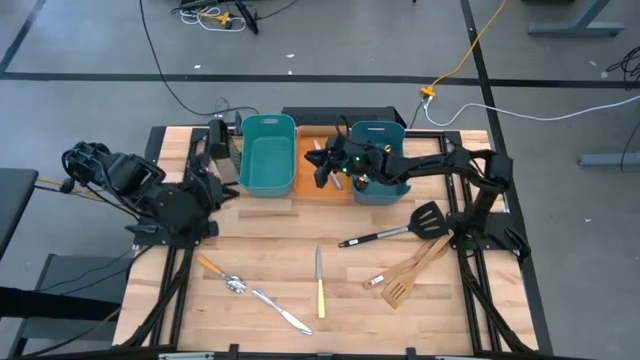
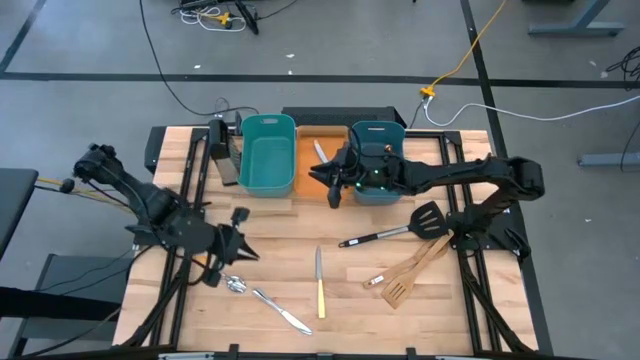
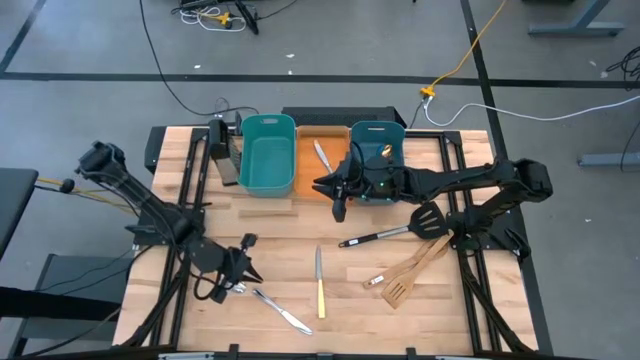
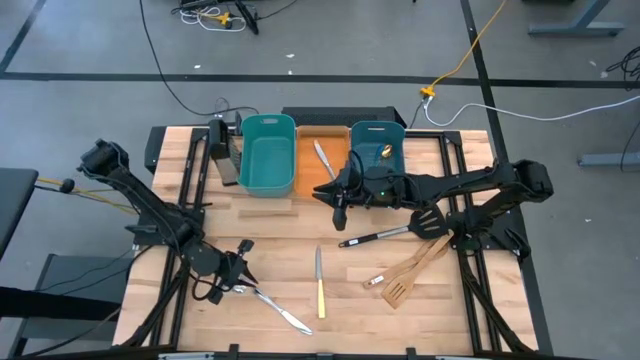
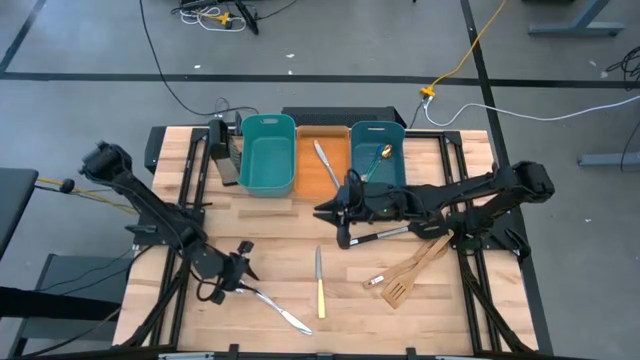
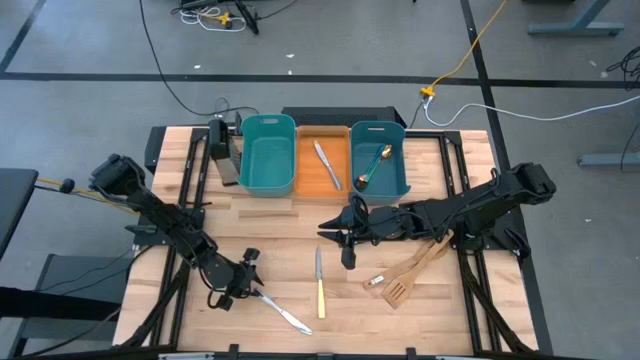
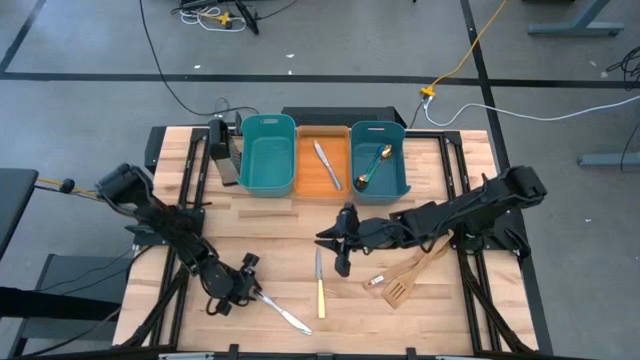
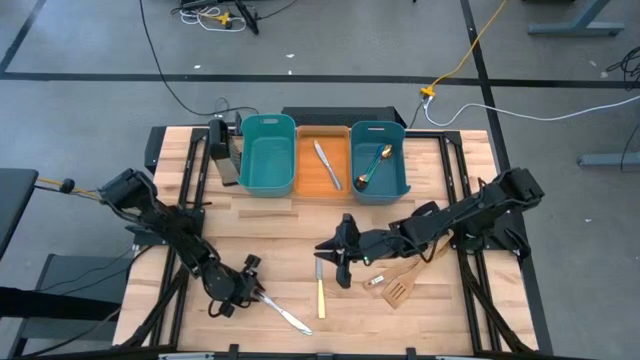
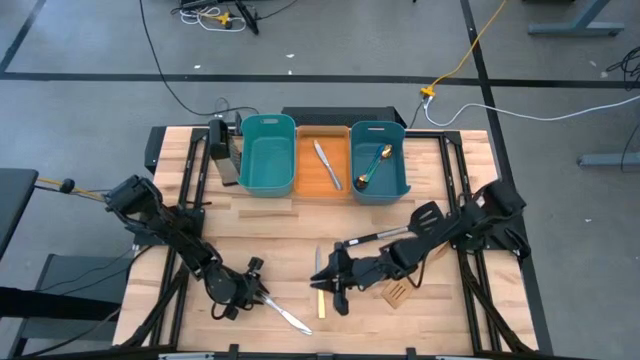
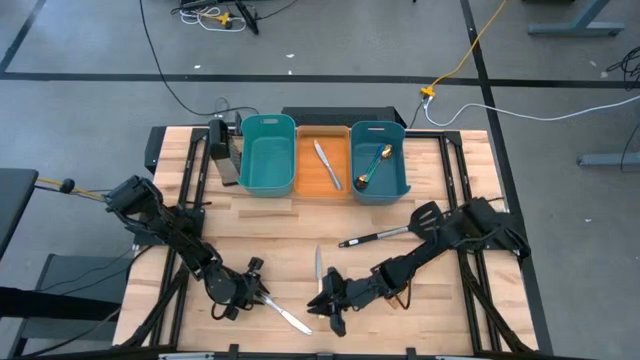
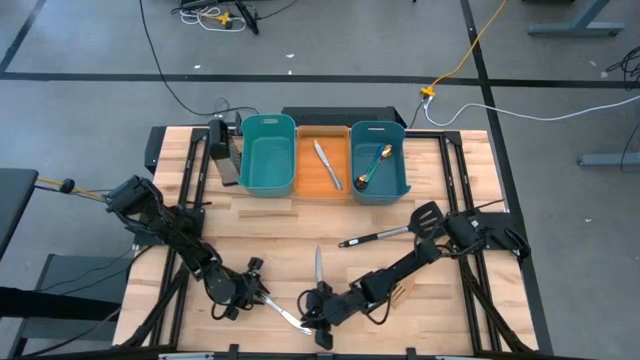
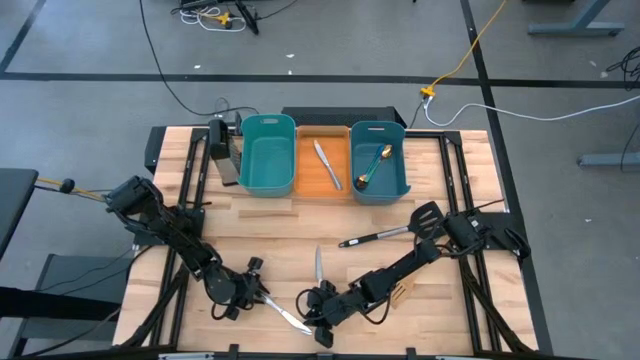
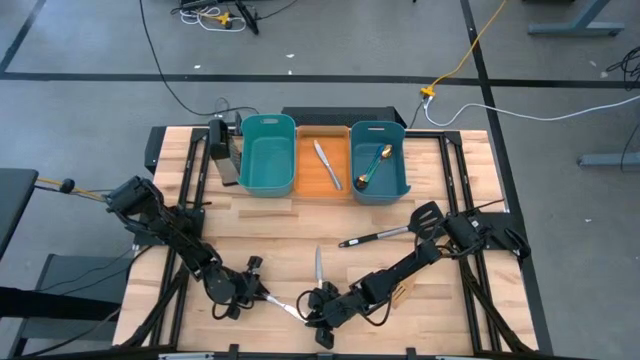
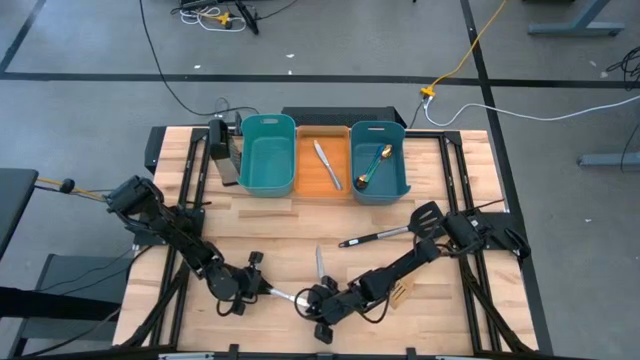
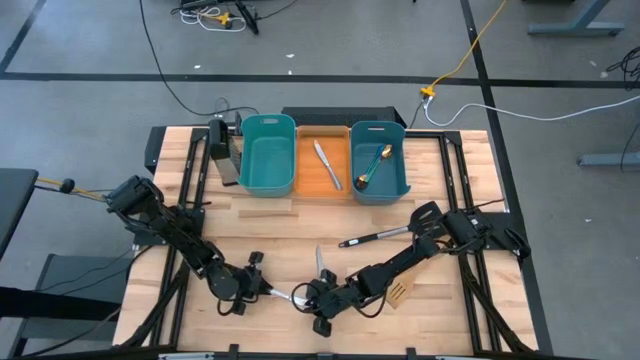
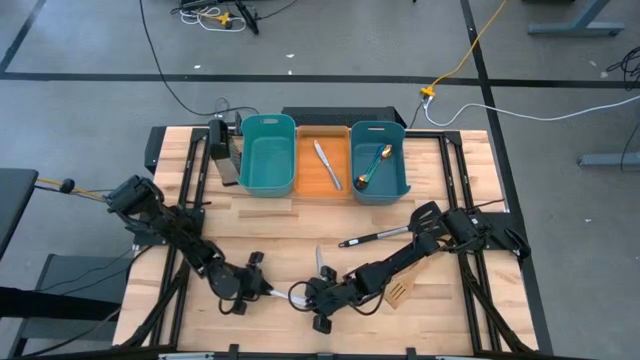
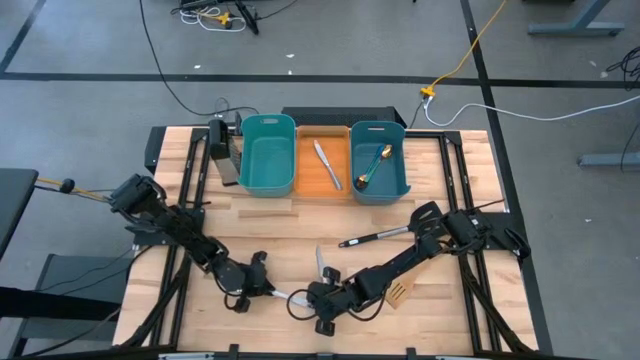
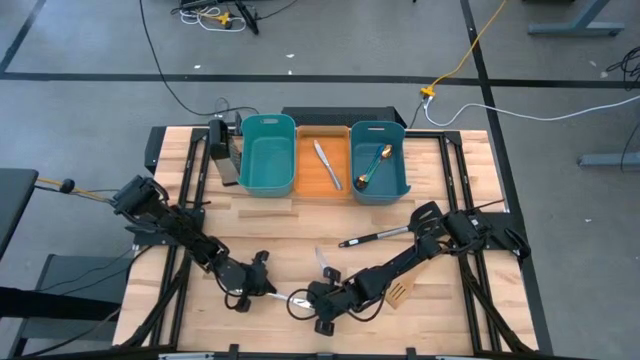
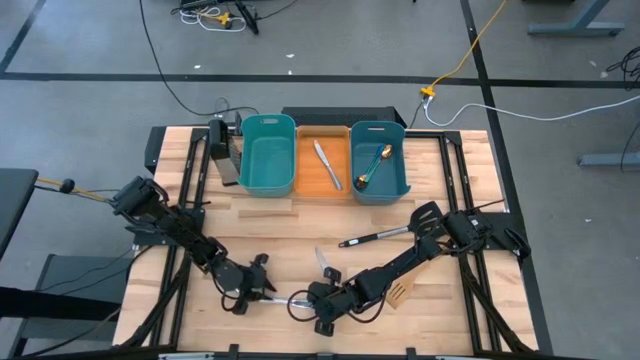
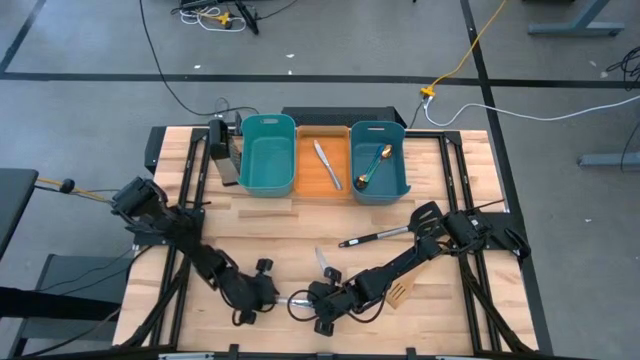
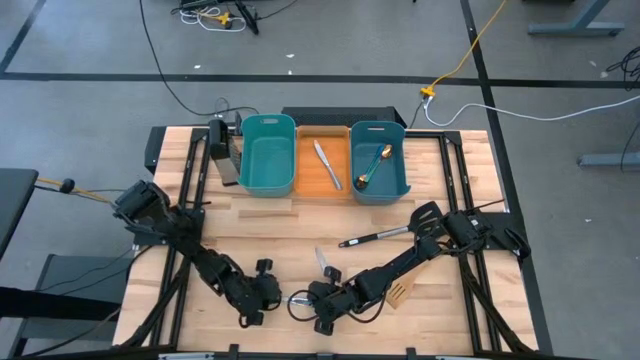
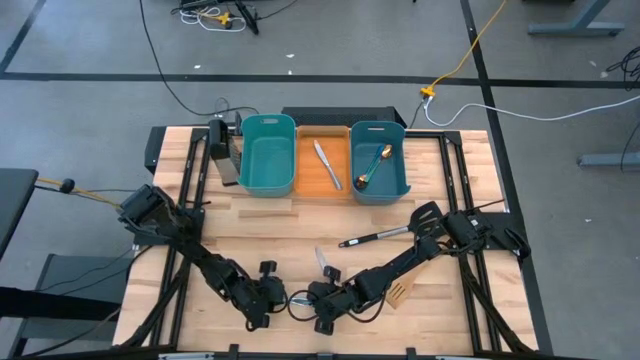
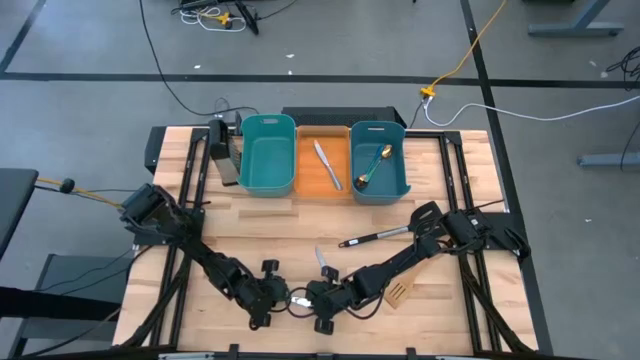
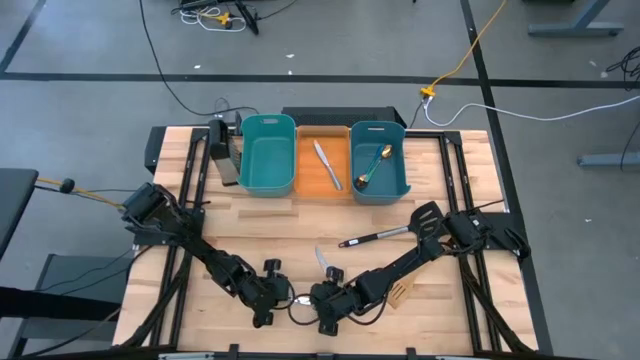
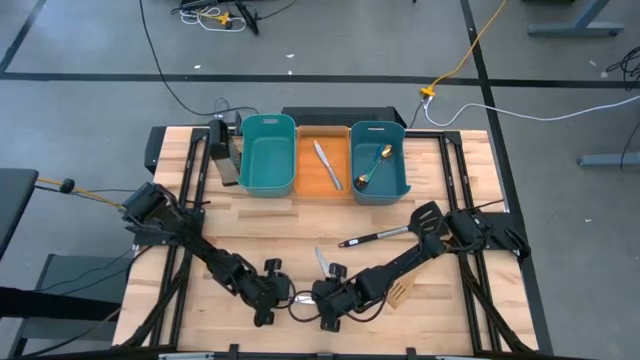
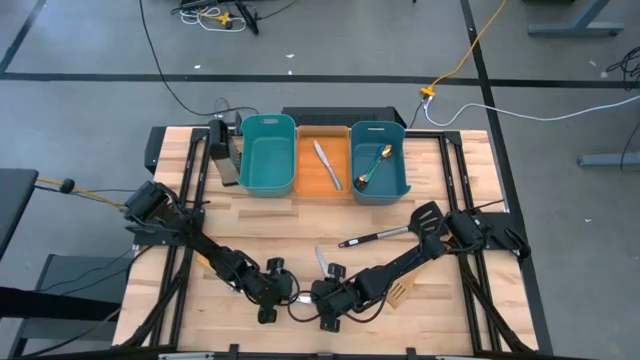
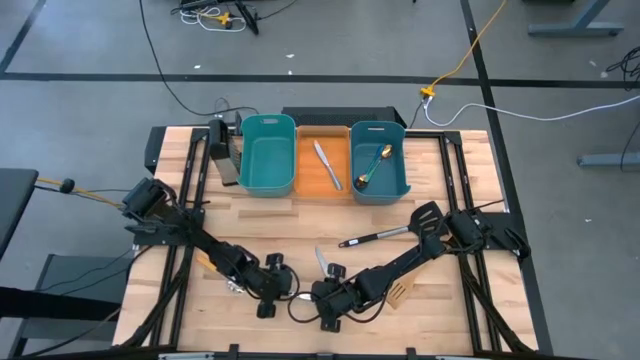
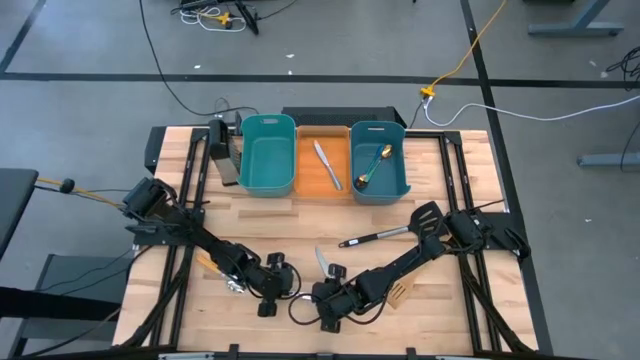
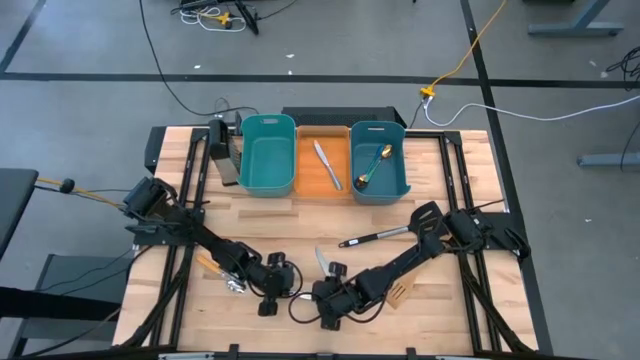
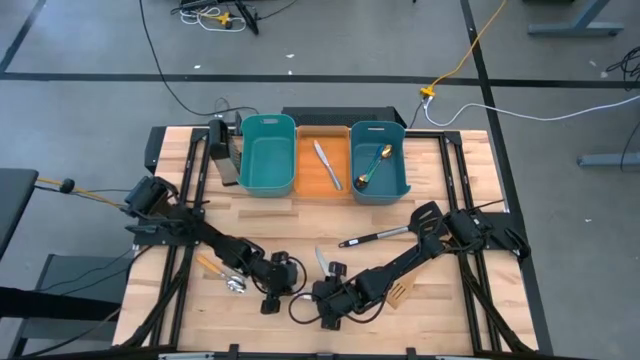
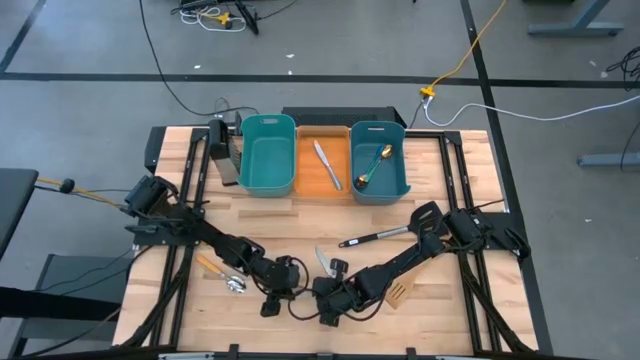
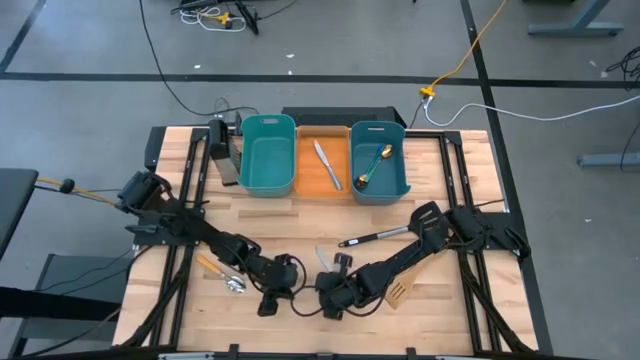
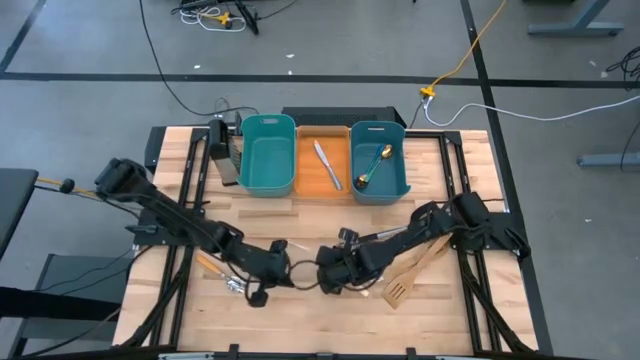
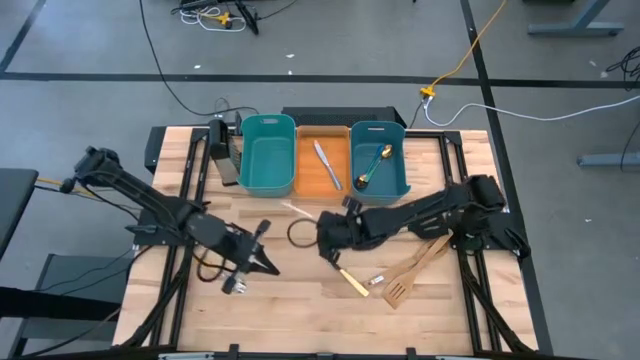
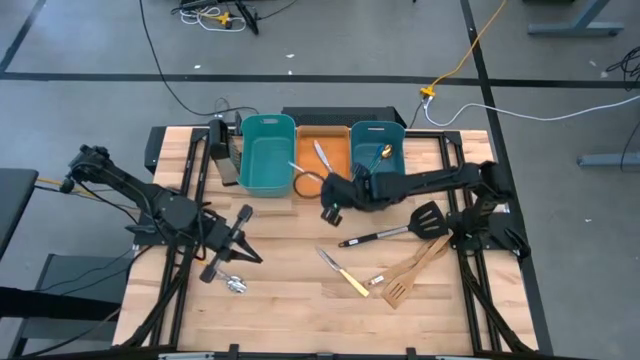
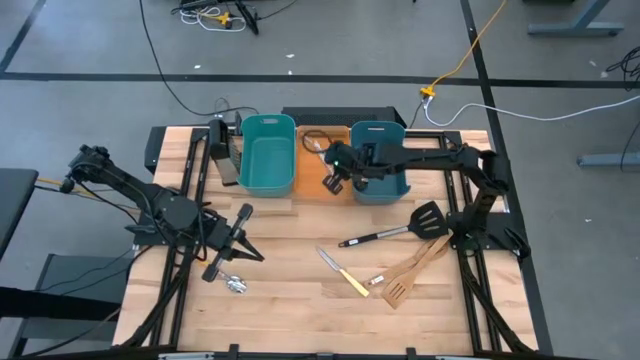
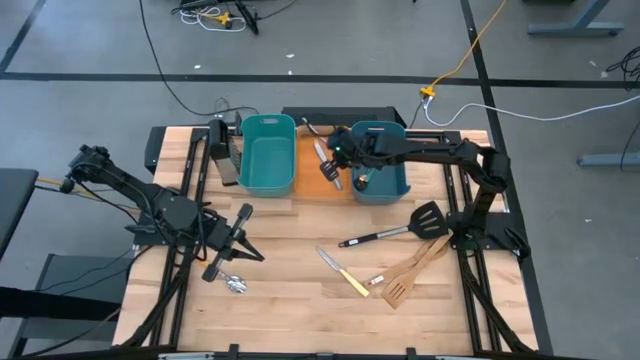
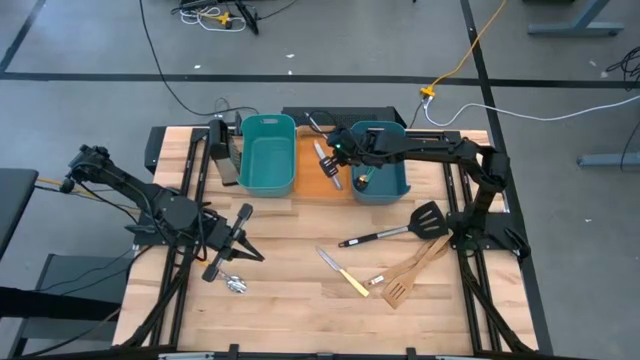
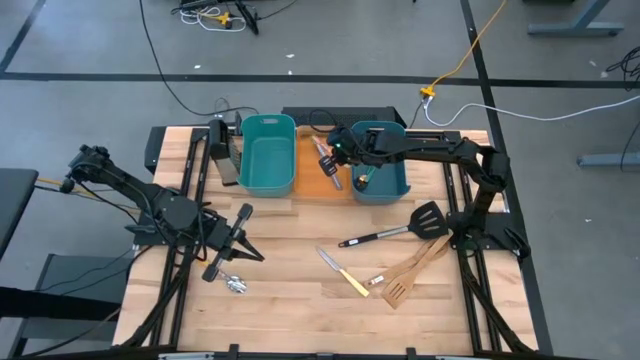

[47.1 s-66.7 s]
Task: Pick & Place Kitchen Items
Put the silver knife into the orange bin

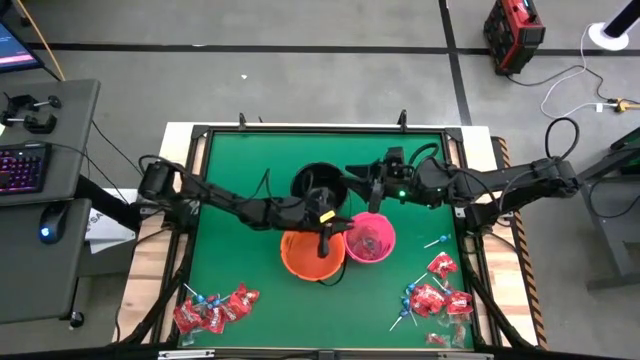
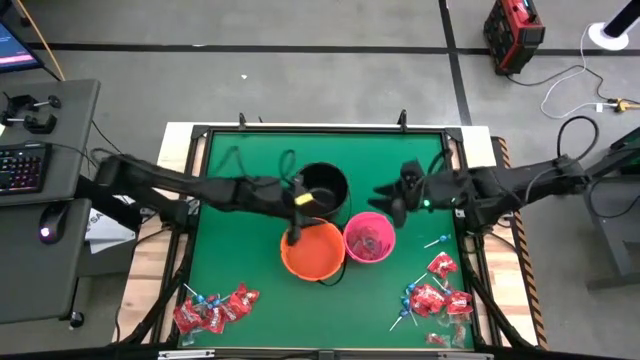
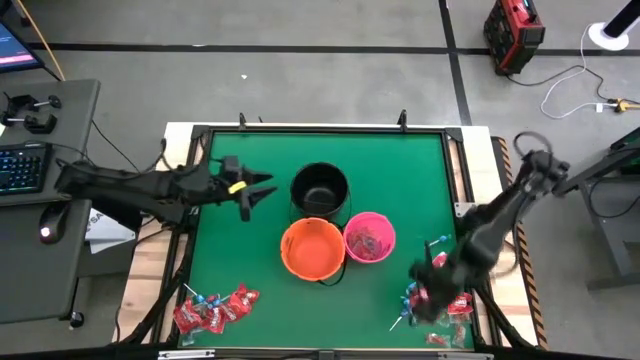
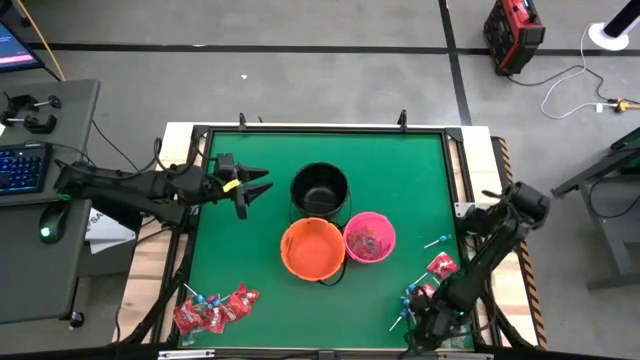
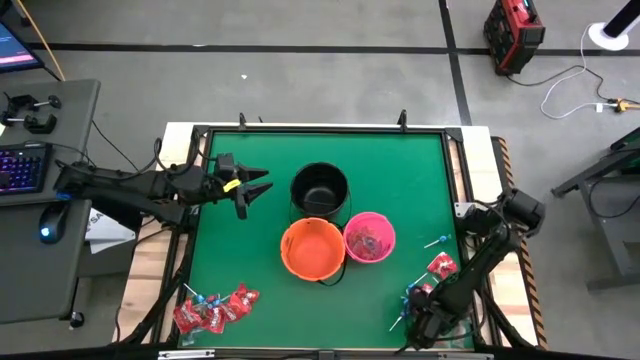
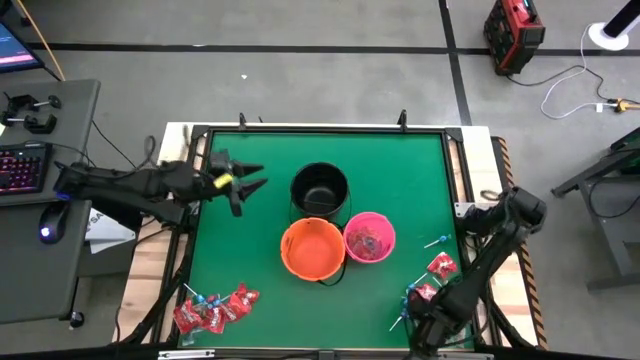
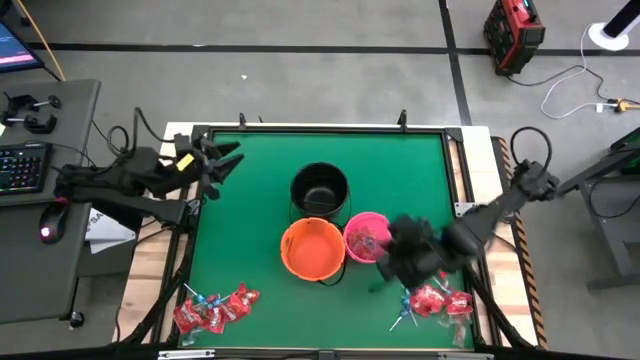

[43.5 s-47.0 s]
Task: Sort candy by brand, put in halloween buckets
Put the red gummy into the pink bucket
